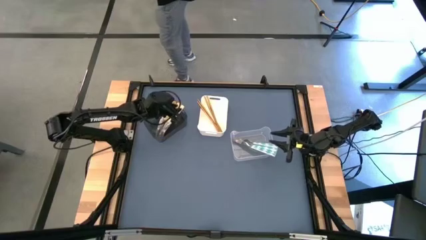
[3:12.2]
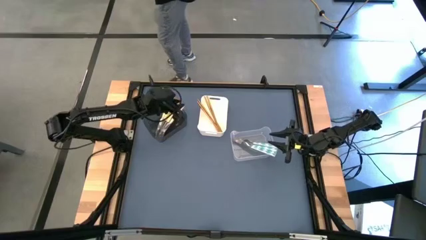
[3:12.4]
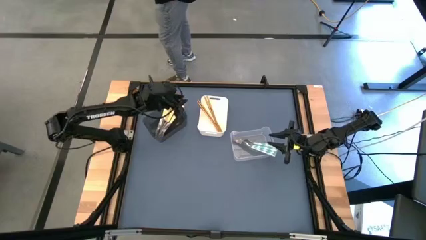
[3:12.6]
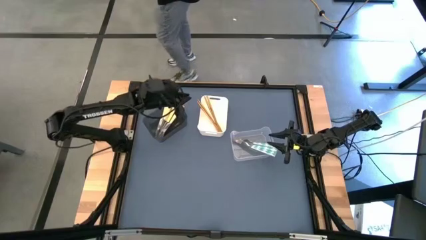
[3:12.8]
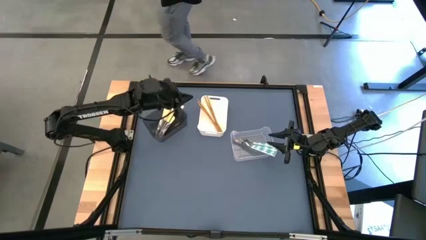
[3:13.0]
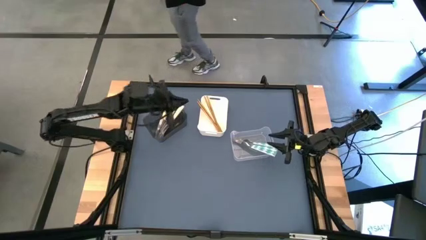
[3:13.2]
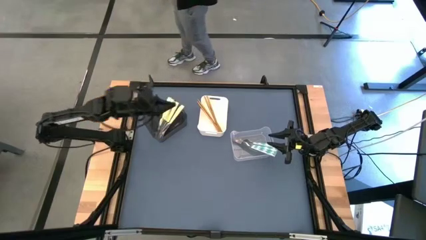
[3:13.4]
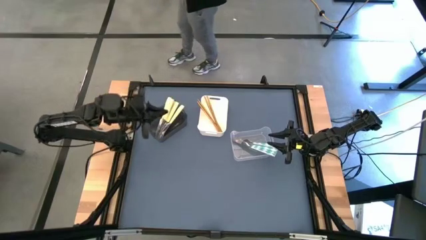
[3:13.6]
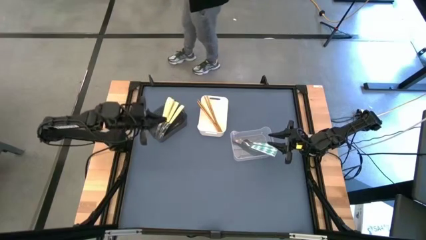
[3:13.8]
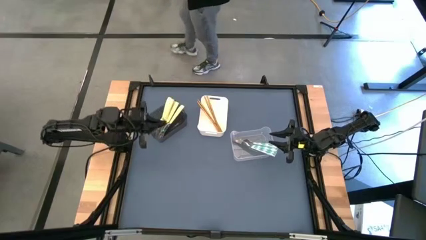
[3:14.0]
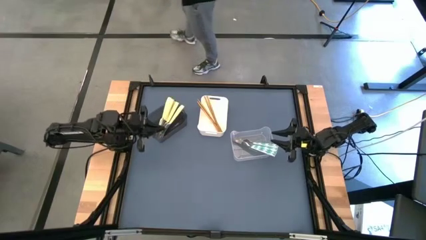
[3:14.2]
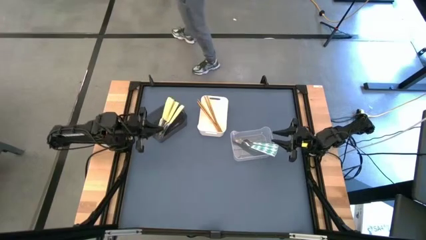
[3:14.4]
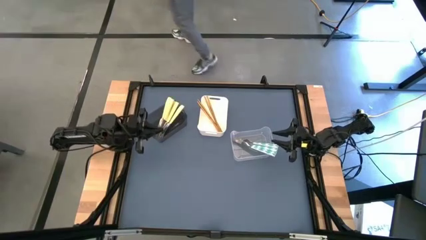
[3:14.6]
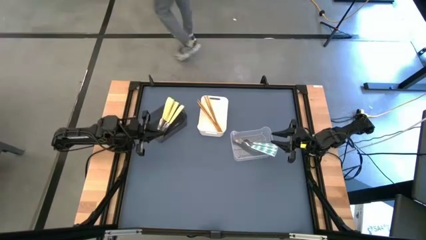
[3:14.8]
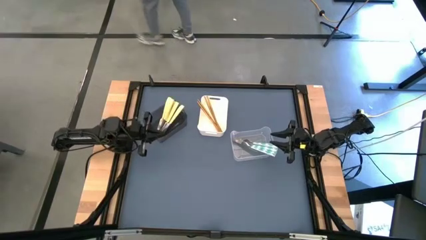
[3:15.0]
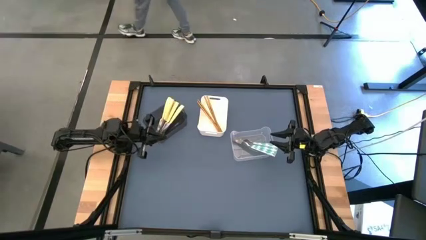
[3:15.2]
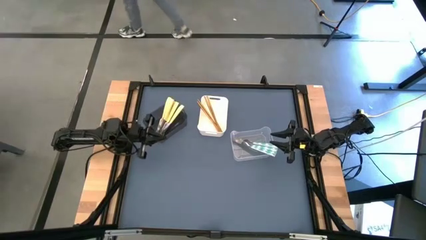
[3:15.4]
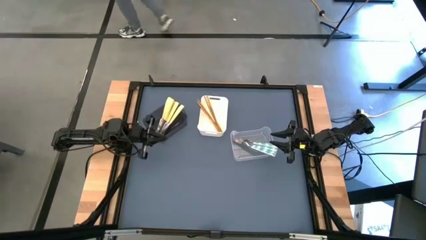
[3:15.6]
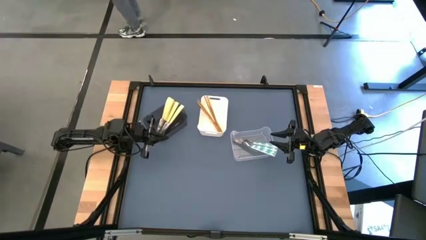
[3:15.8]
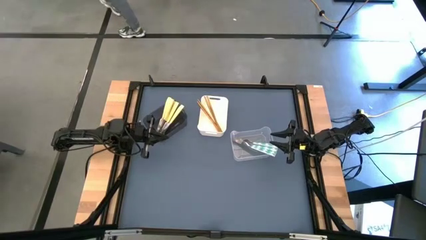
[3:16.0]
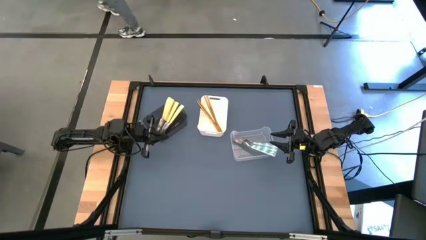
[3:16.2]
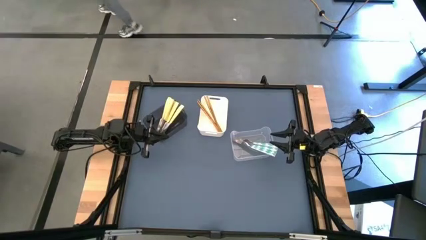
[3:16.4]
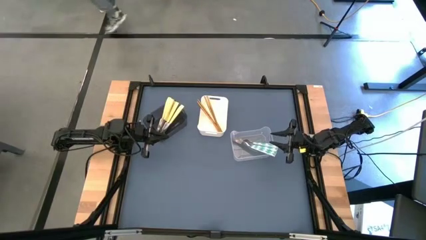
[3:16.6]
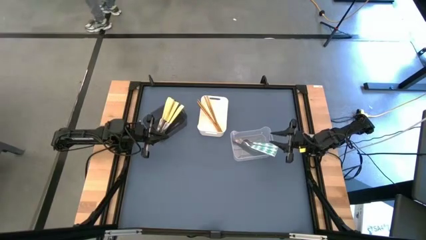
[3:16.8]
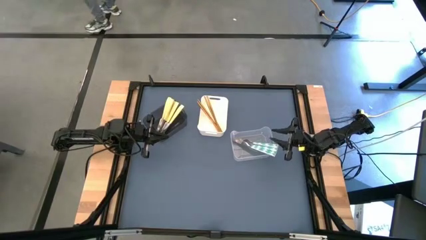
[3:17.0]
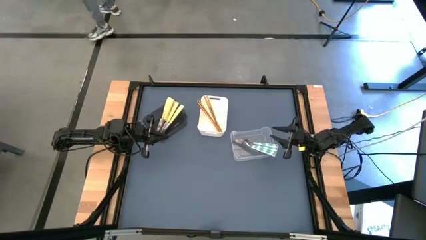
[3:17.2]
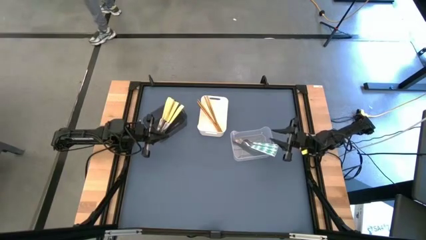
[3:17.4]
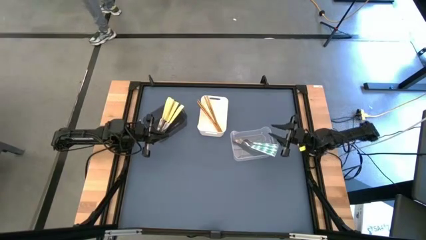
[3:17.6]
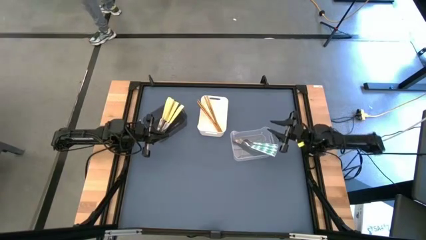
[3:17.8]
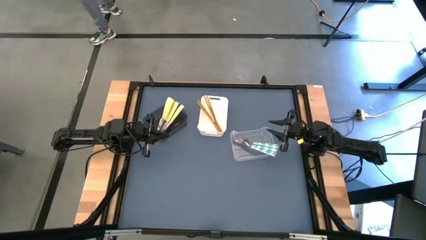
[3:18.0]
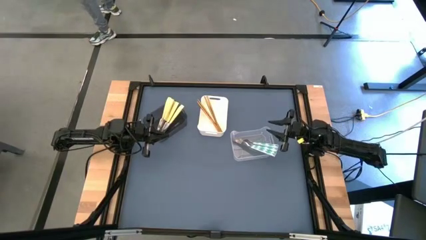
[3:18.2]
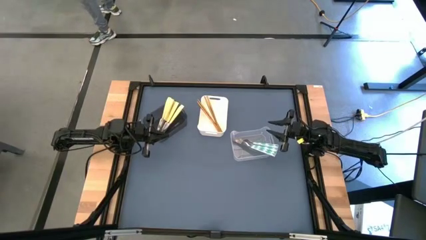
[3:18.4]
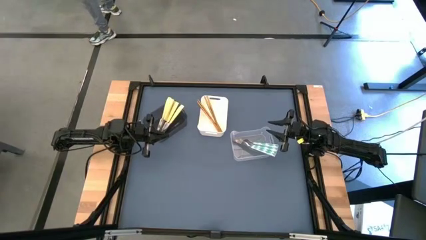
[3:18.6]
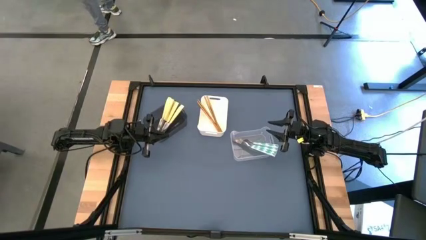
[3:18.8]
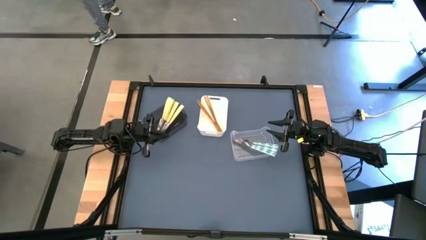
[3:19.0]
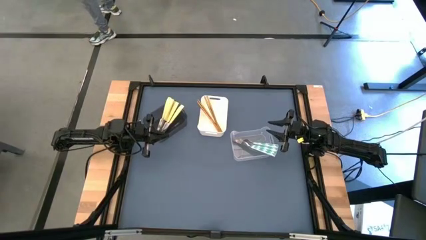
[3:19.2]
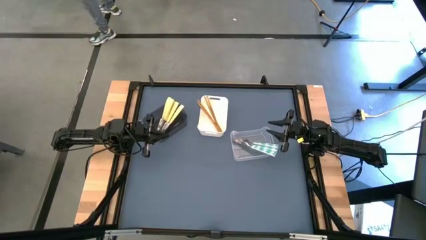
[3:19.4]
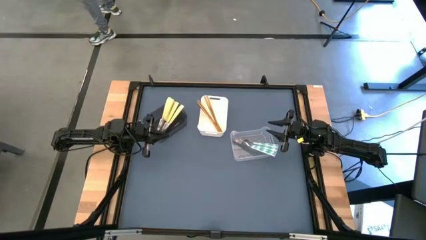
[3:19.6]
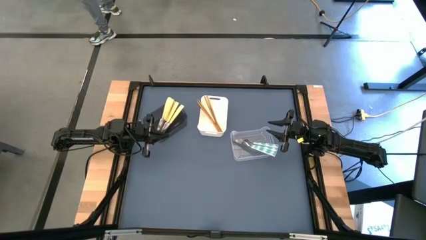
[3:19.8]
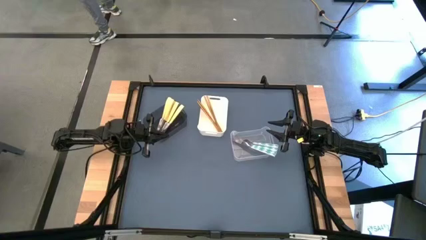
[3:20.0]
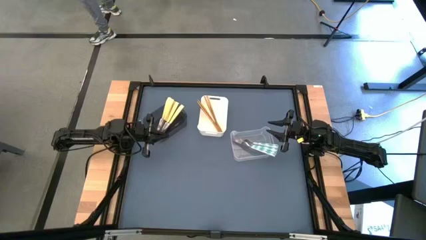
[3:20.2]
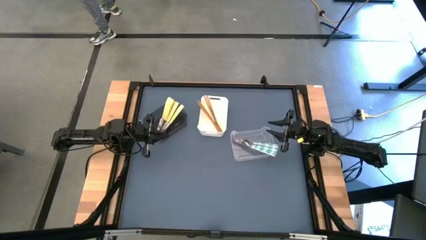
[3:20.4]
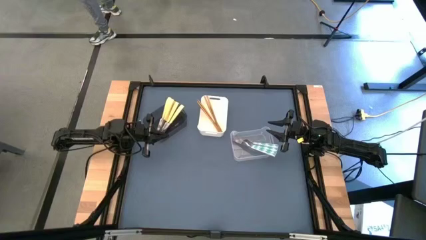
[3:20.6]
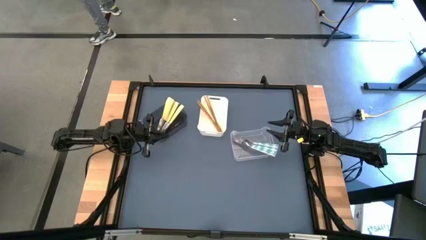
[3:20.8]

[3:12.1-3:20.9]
Task: Sort silverware by color (type)
Return to Home Position

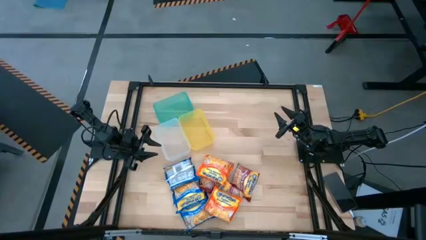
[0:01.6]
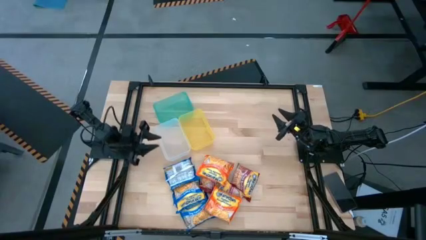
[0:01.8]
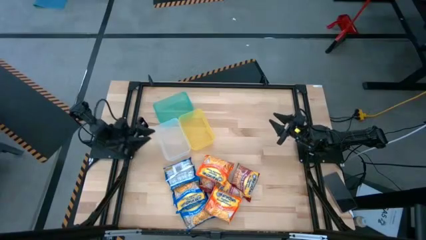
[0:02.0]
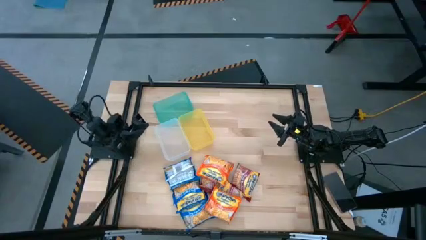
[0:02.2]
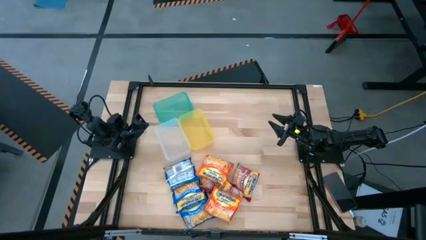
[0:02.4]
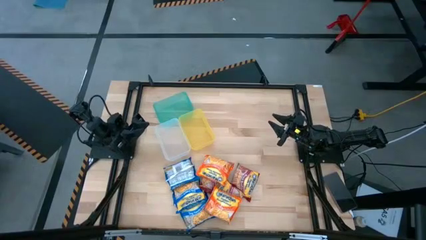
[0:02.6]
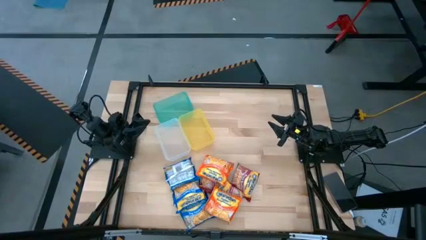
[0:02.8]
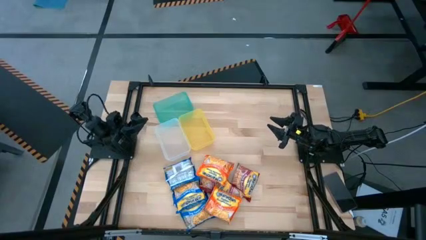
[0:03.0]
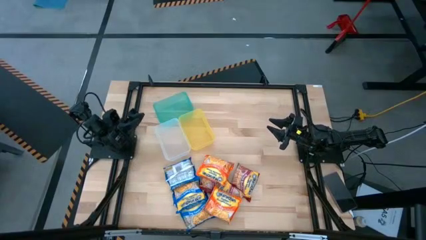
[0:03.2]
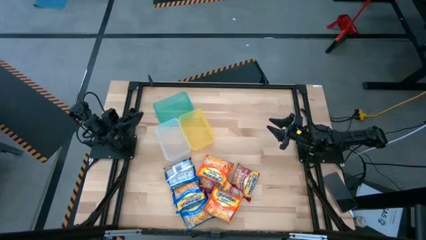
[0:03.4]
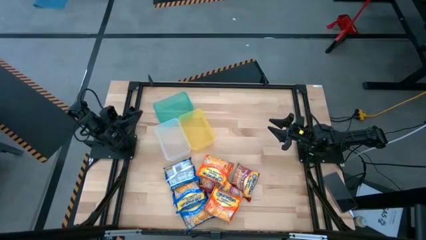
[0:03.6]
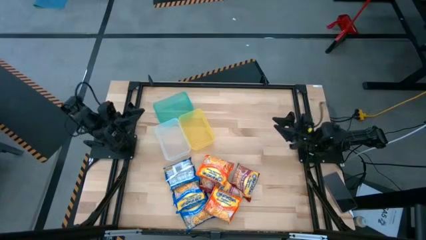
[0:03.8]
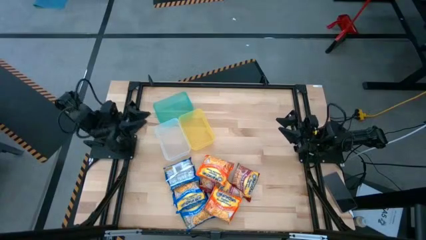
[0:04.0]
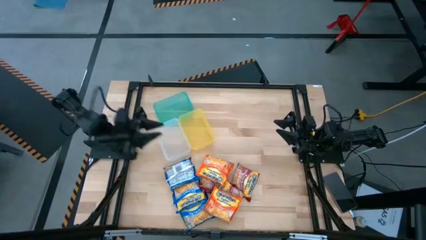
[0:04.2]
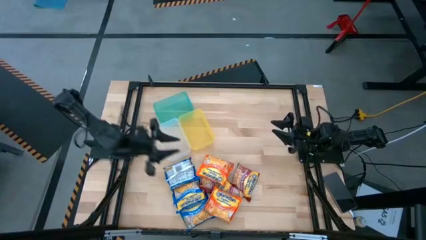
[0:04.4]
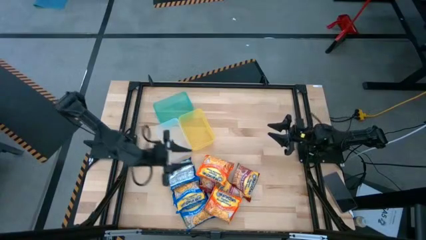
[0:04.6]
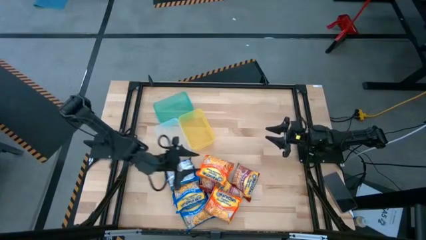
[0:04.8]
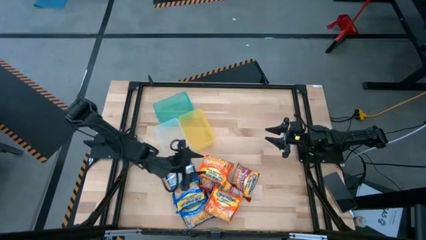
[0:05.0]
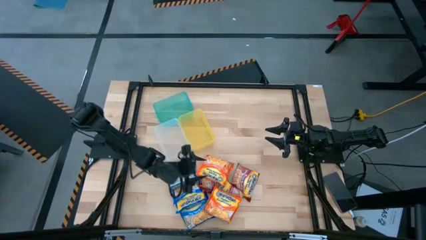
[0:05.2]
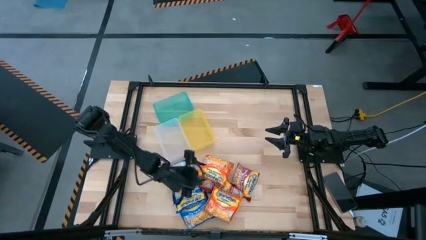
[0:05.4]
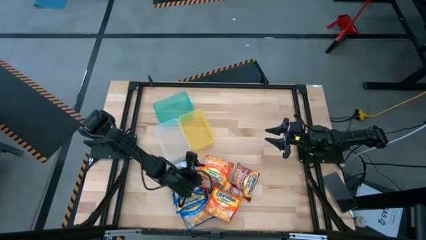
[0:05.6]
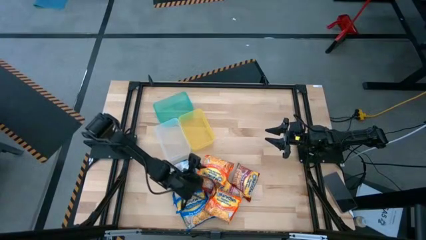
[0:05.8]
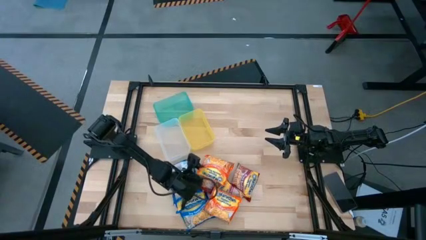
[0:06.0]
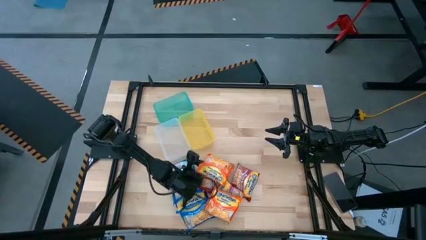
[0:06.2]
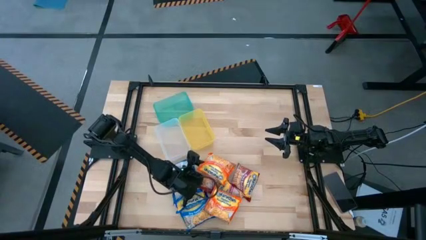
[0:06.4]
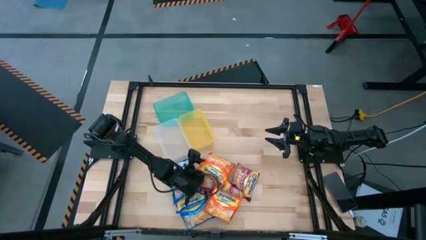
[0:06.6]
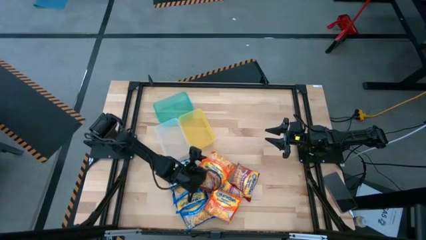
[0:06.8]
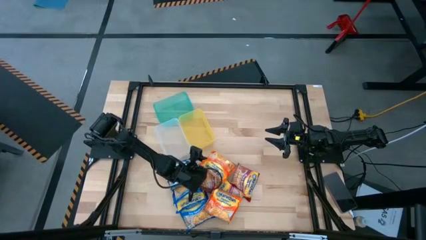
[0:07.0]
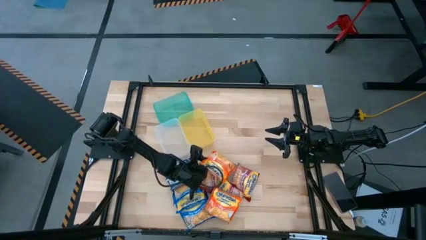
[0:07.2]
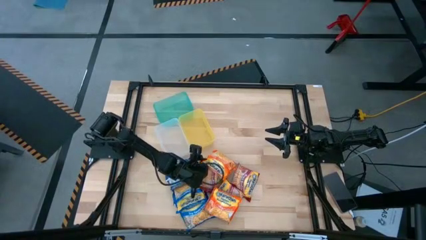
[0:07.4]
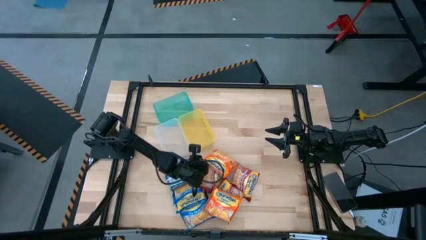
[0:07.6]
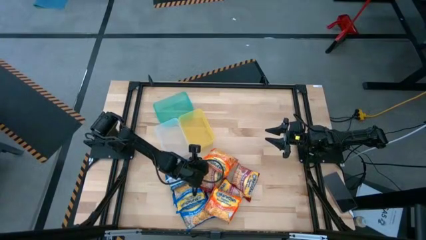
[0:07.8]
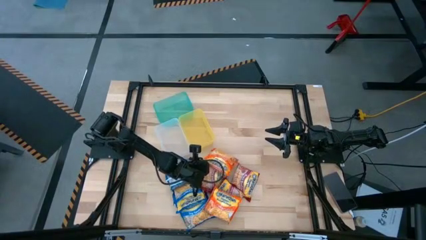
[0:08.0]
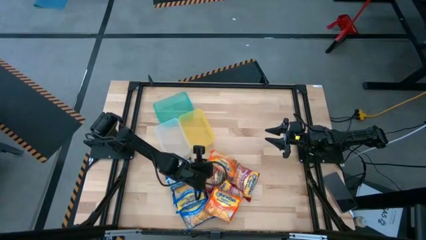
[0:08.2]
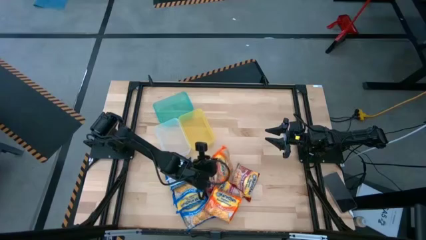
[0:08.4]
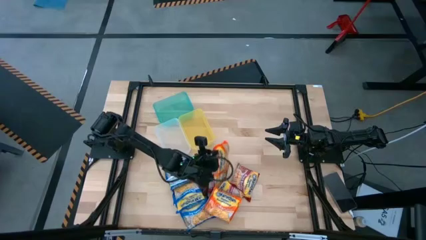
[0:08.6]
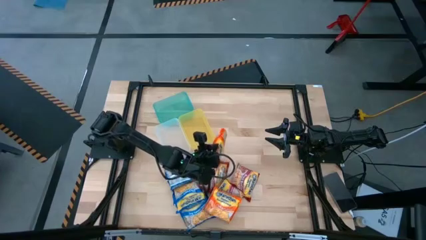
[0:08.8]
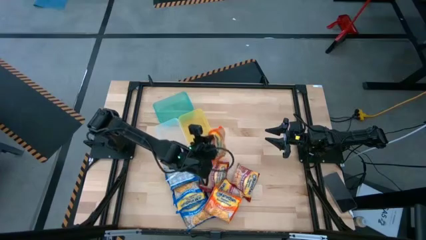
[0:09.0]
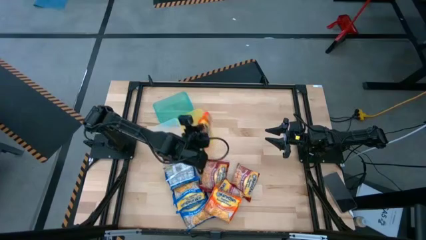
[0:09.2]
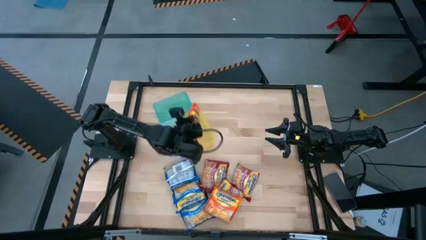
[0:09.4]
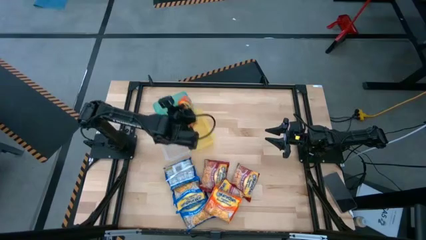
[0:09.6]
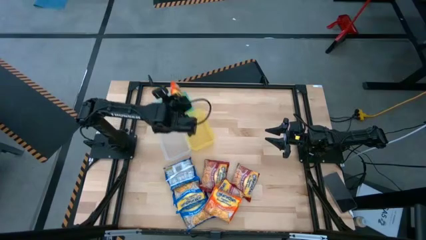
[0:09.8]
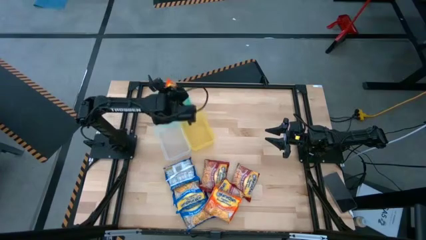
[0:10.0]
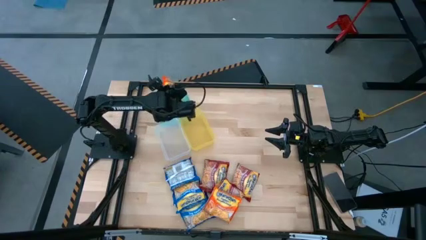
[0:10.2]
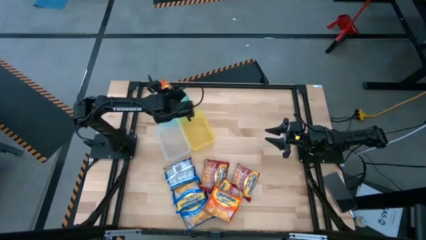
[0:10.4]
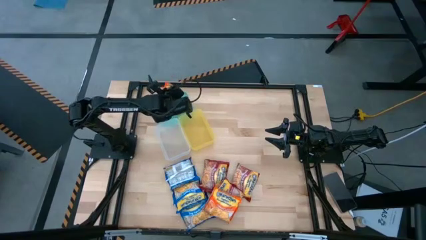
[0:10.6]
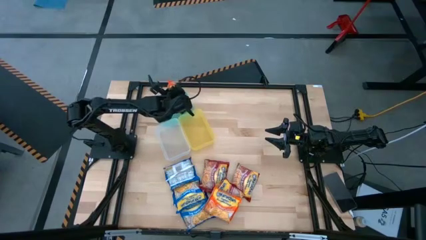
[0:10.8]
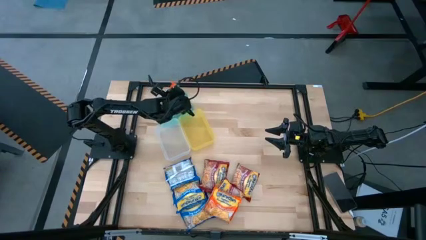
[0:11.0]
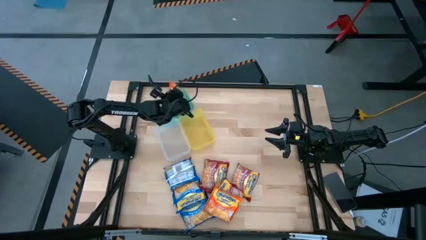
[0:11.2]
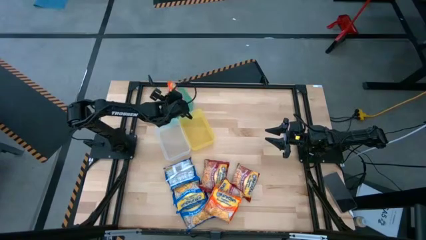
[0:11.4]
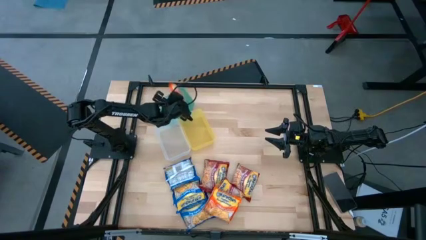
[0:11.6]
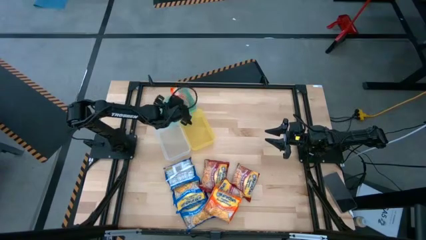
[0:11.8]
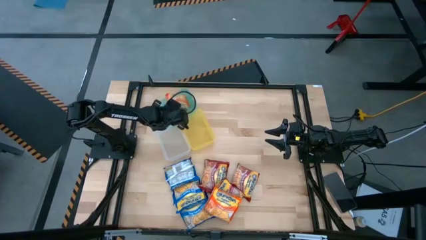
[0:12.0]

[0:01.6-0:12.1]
Task: Sort Maruchan noodles
Put the top orange noodle pack into the blue bin
